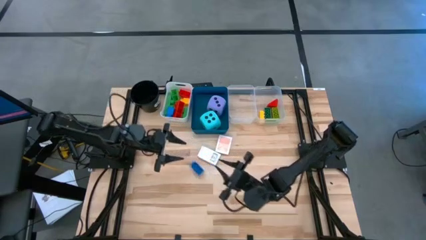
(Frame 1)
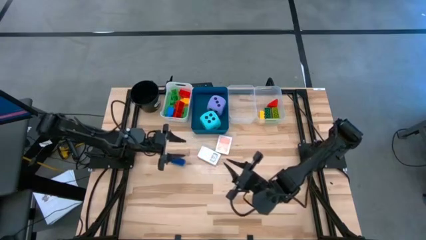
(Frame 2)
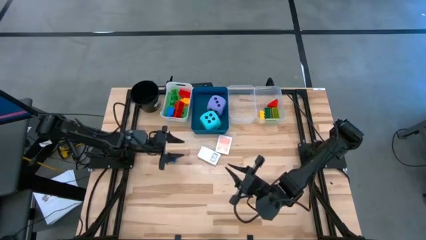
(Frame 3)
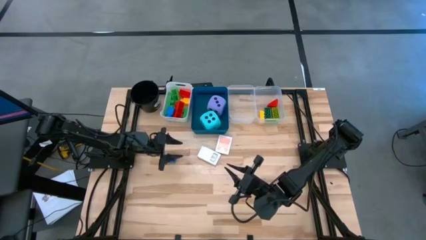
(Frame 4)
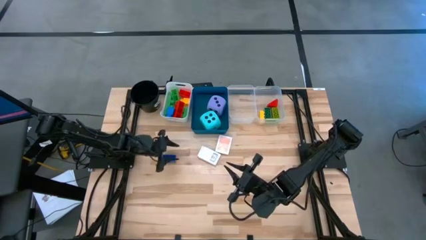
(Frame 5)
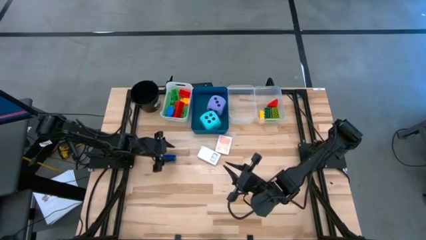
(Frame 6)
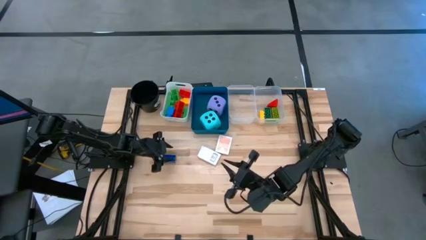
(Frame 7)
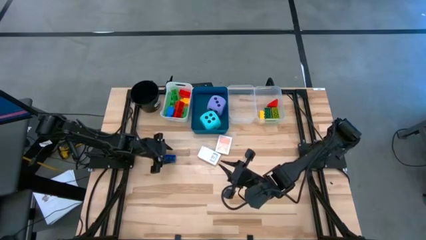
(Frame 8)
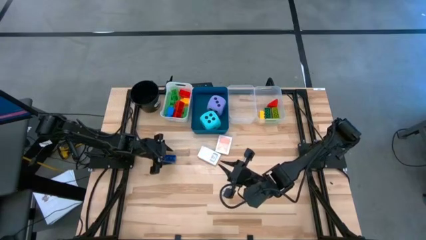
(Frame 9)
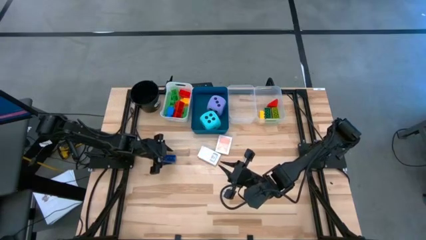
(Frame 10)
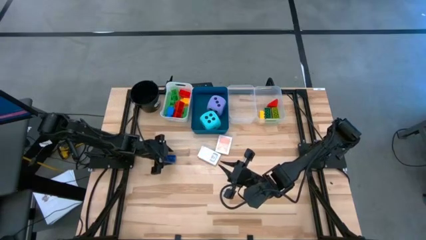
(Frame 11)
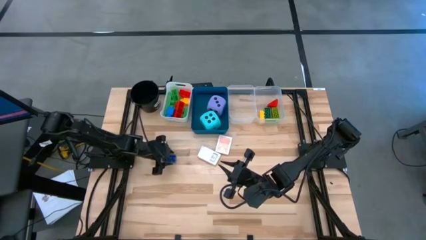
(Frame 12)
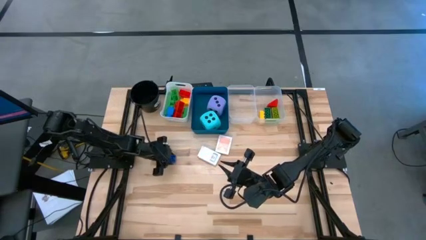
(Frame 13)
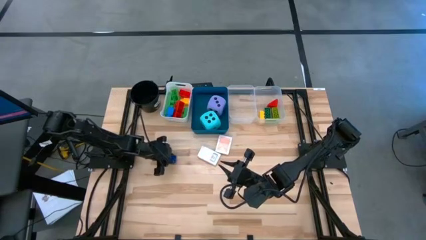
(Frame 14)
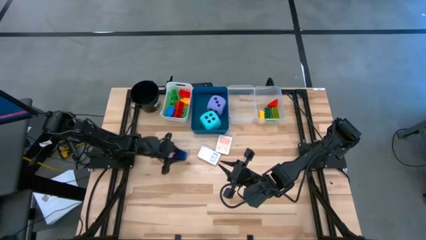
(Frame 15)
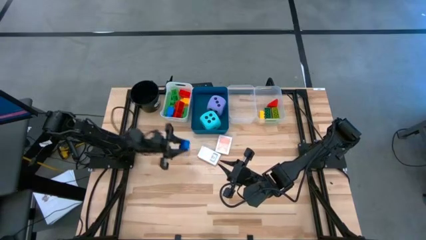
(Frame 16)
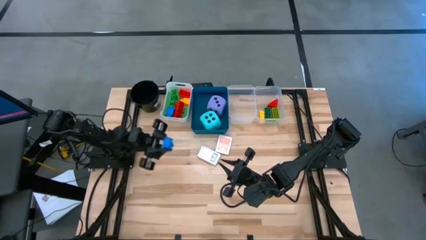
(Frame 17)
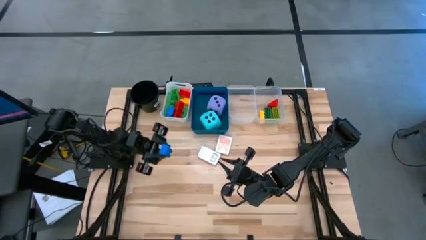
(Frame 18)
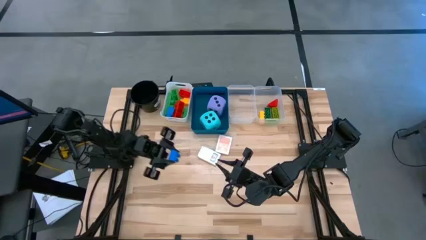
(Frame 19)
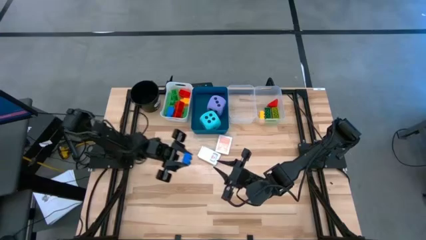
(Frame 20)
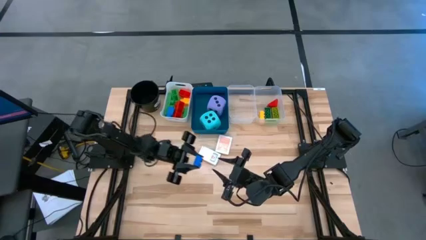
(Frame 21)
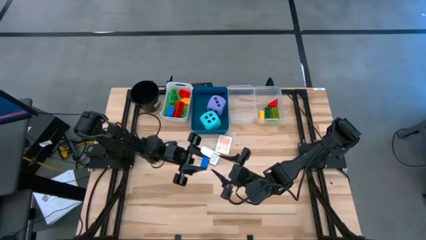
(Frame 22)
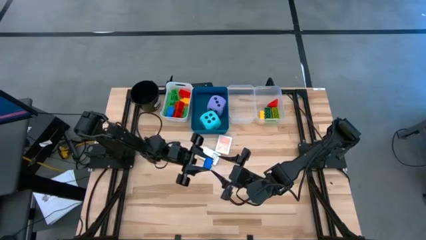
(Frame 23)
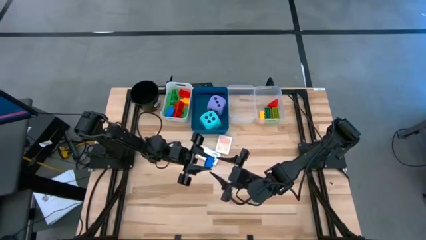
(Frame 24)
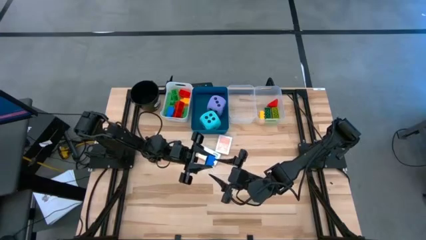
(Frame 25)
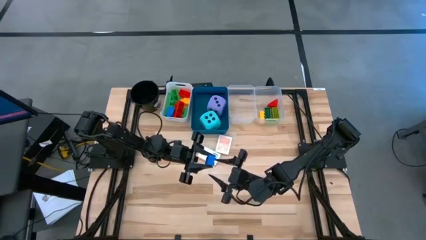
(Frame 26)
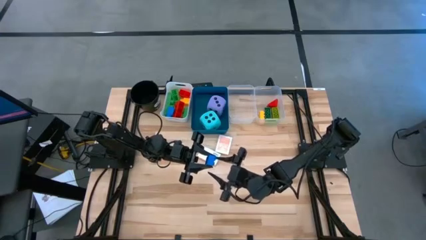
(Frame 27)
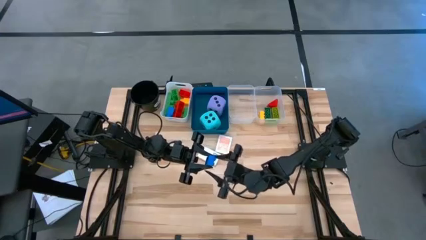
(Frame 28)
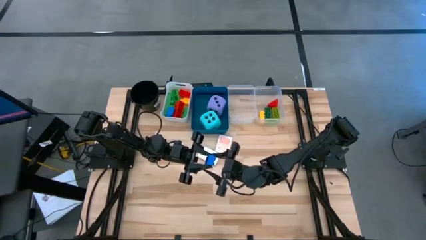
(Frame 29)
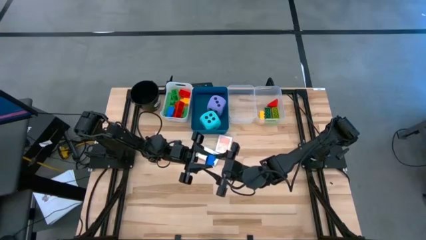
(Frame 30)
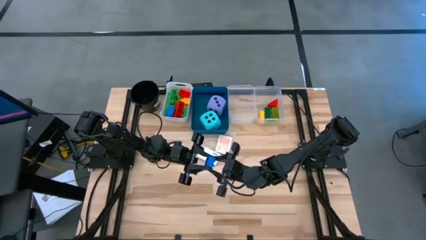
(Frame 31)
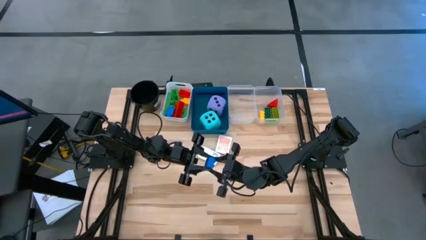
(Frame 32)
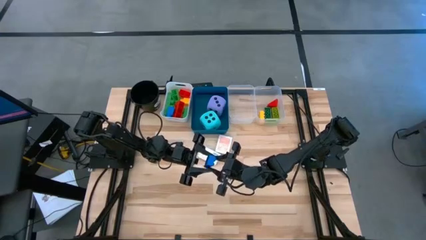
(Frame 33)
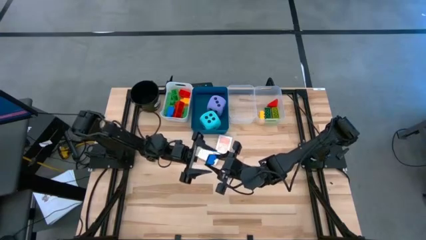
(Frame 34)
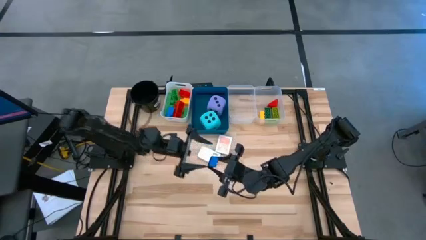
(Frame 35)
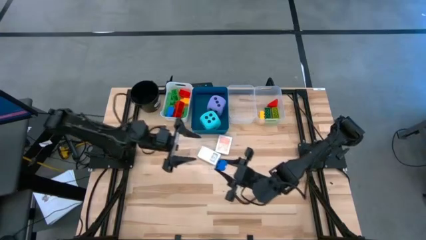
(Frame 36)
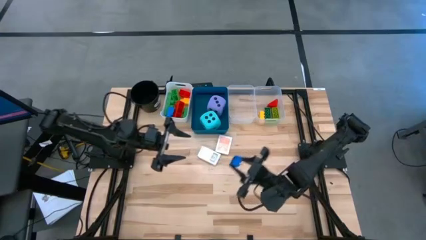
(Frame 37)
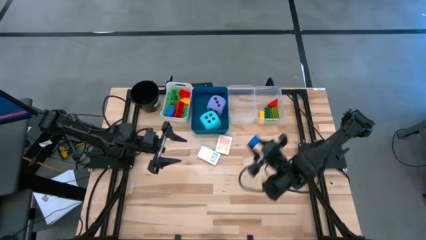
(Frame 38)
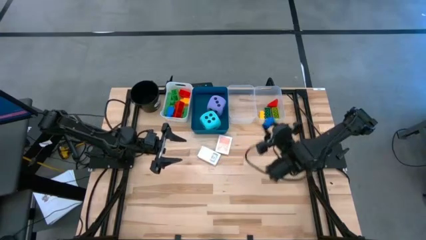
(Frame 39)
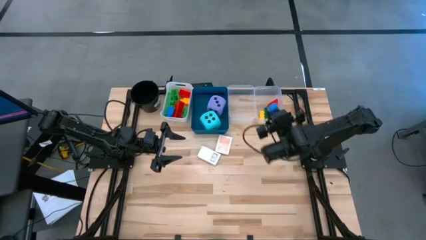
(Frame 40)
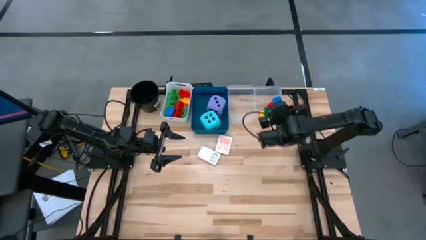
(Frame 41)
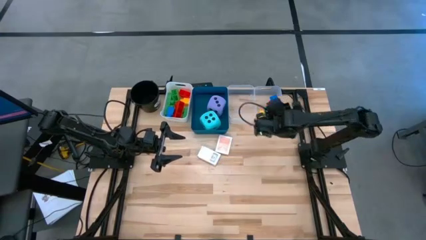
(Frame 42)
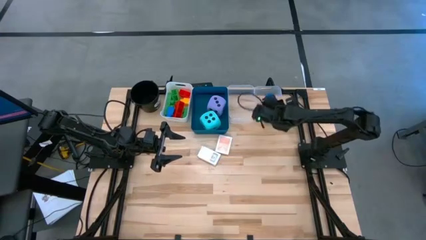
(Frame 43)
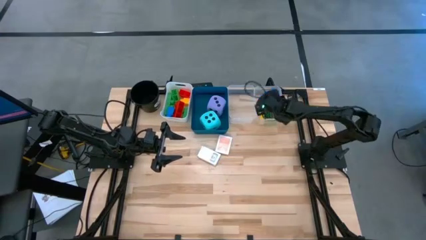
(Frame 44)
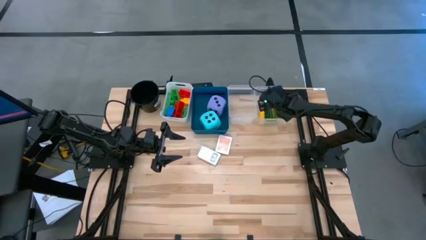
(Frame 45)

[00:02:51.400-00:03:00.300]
Task: Pick & Place Toys
Put the small dark blue game piece into the right transparent bin

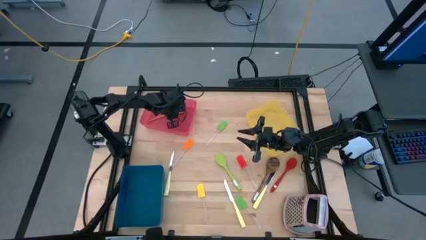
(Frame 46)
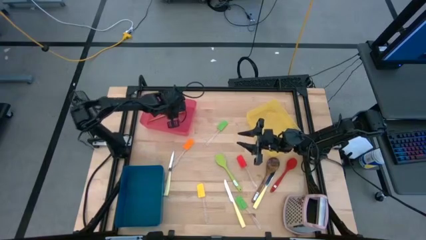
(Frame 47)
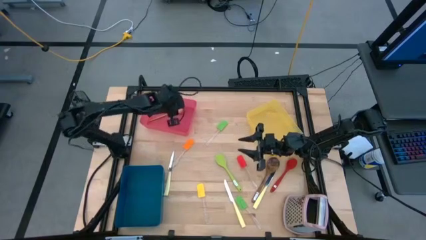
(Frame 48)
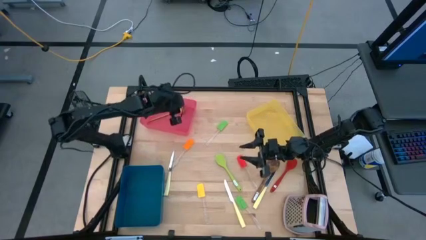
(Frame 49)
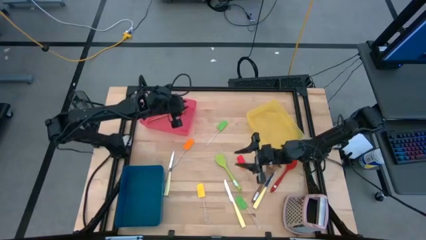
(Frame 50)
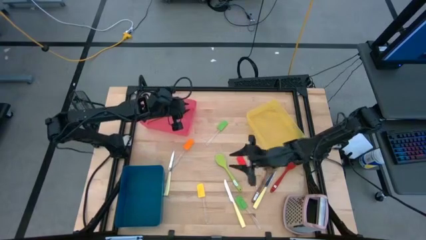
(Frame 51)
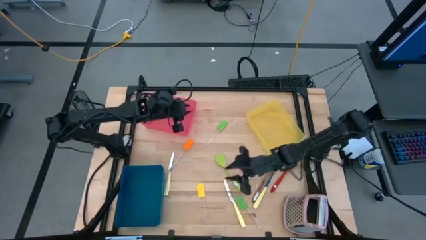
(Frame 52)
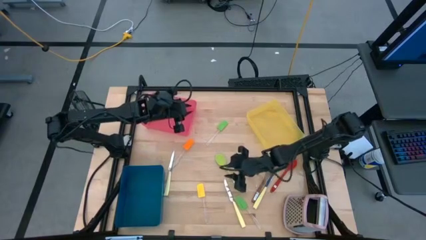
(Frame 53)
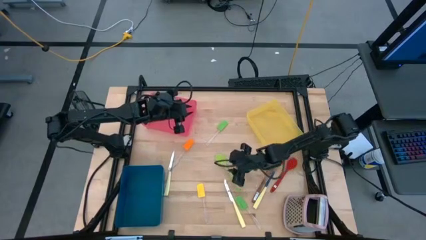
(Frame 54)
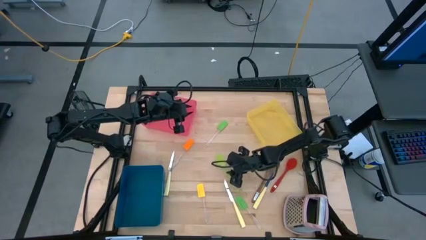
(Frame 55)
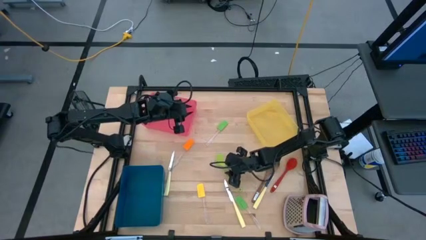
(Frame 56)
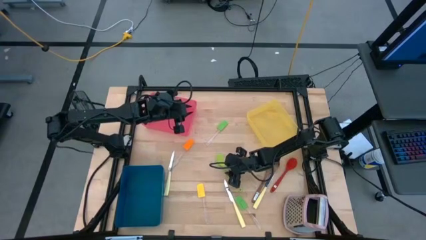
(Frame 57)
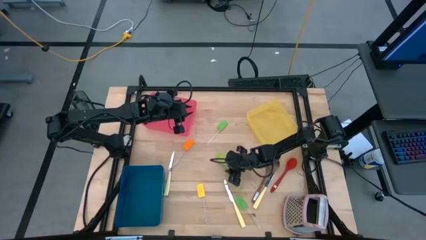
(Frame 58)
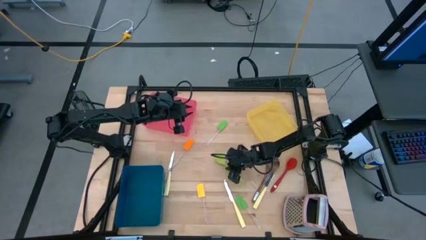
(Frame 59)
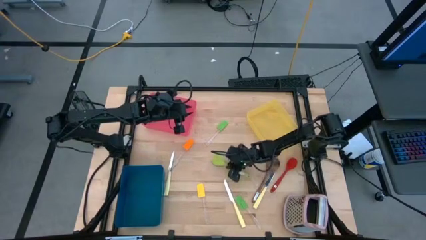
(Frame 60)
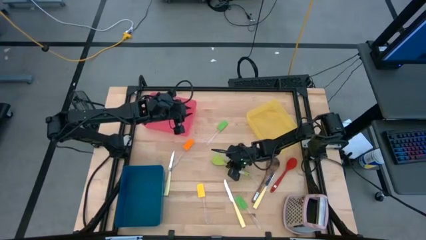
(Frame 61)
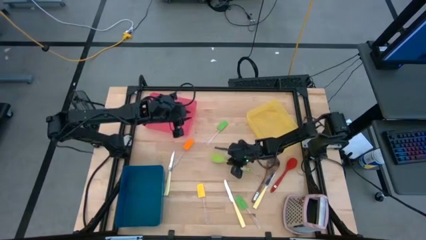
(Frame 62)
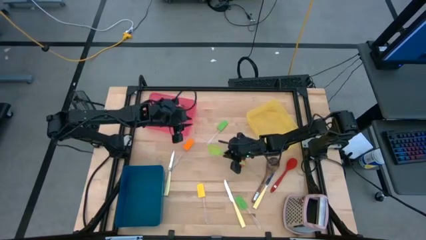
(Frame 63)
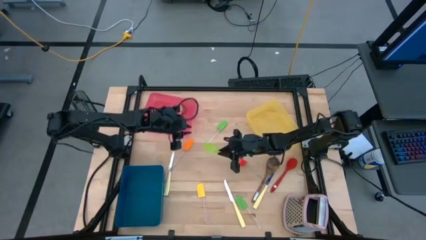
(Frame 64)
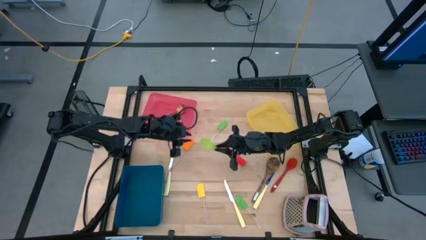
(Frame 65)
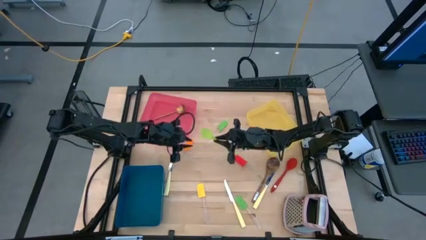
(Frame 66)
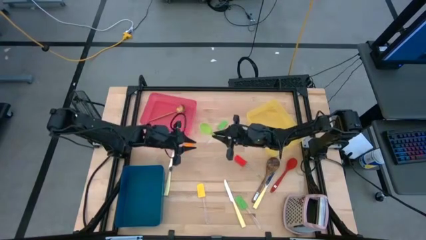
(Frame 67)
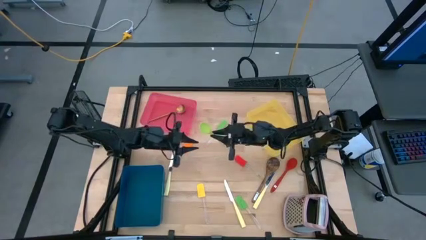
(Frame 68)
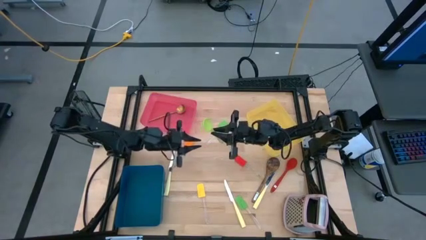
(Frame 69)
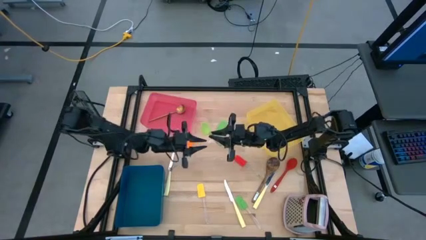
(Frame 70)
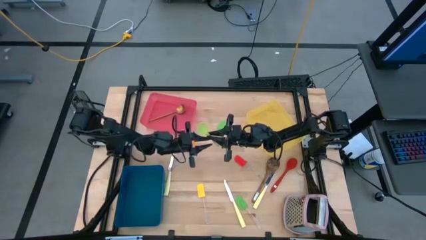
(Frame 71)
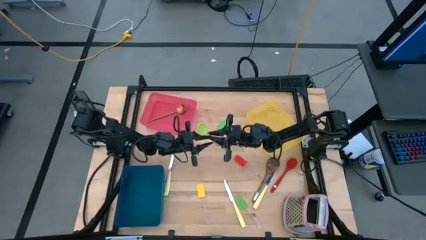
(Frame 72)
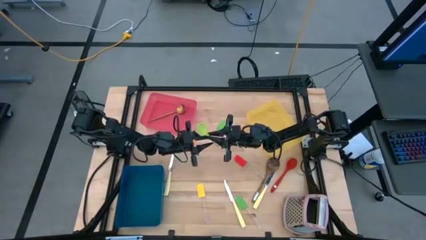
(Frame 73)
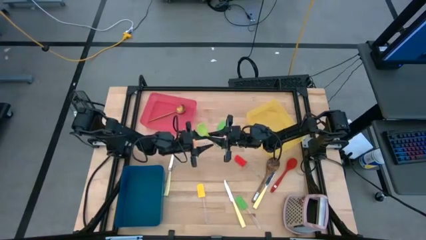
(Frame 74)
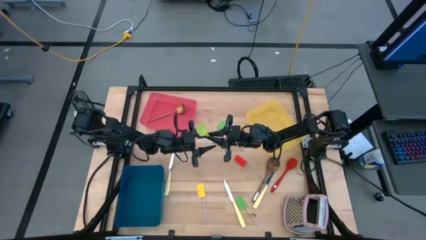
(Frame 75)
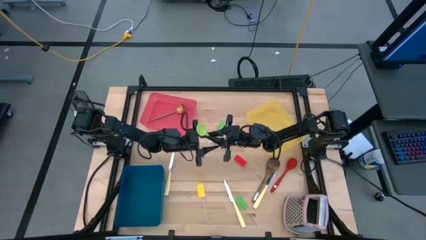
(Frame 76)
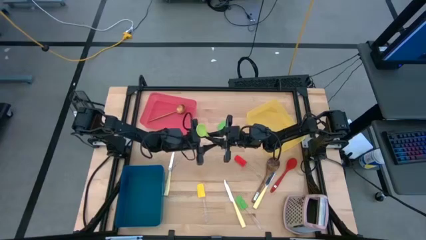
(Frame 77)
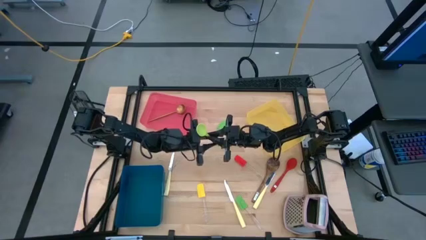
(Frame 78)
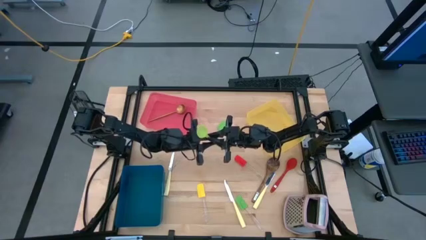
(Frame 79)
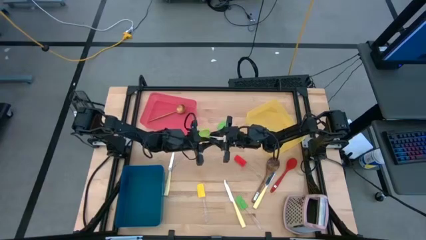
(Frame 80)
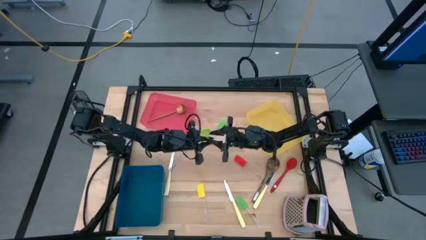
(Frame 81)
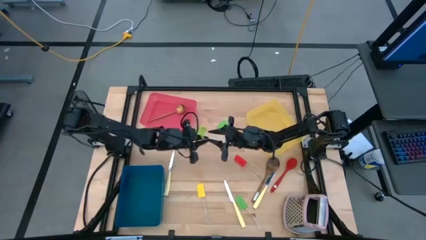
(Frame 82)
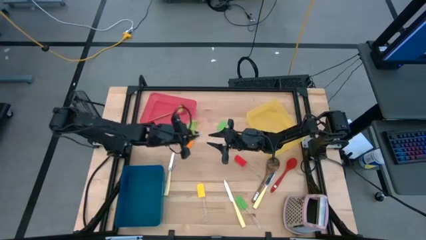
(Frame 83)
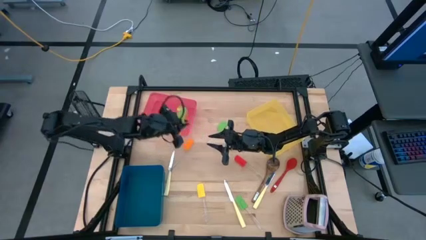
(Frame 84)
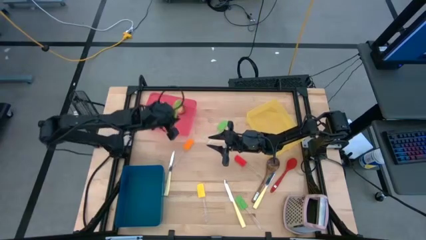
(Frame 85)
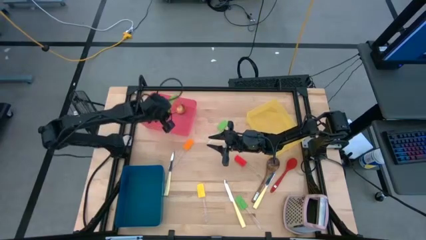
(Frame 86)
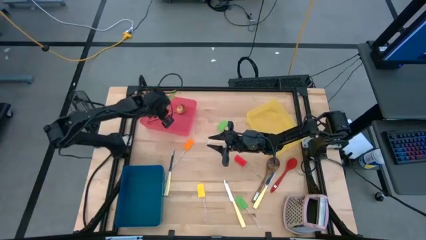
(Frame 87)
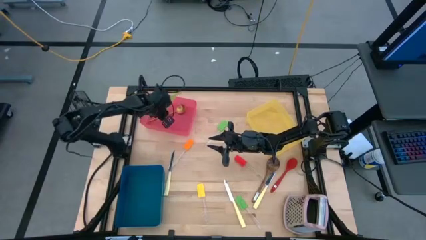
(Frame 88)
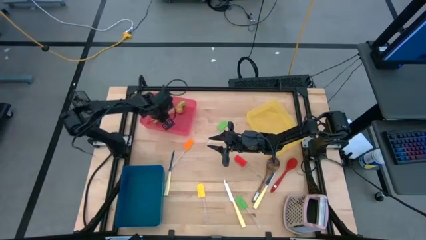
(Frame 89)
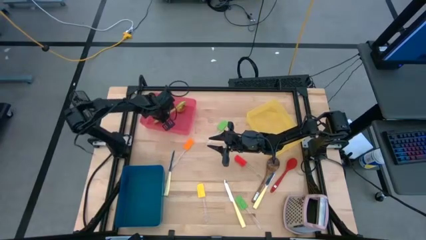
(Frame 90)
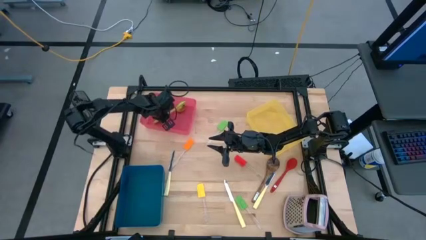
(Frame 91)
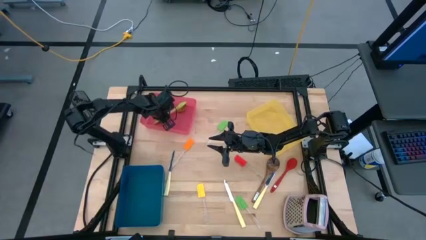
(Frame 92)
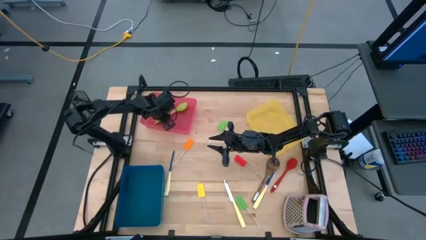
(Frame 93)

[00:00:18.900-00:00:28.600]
Task: Pick & Place Kitchen Items
Put the green serving spoon into the red bin
